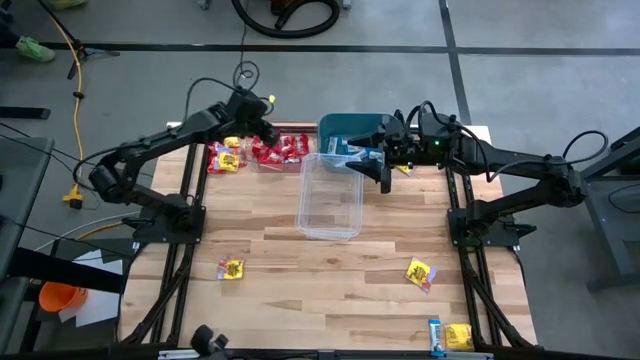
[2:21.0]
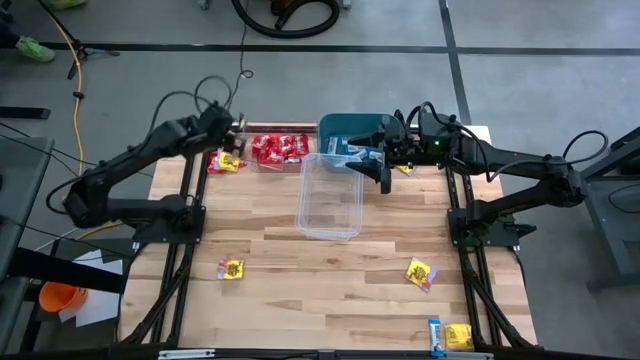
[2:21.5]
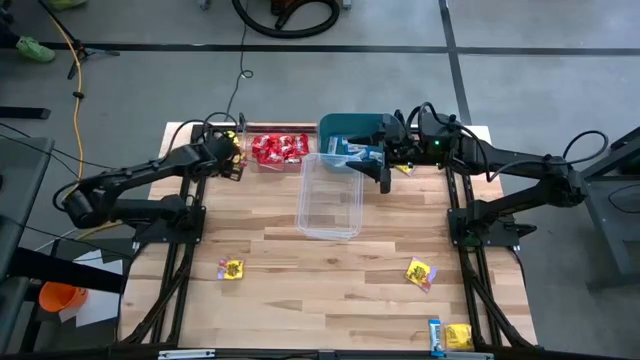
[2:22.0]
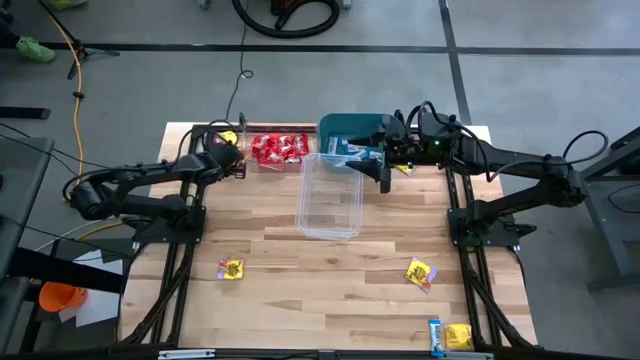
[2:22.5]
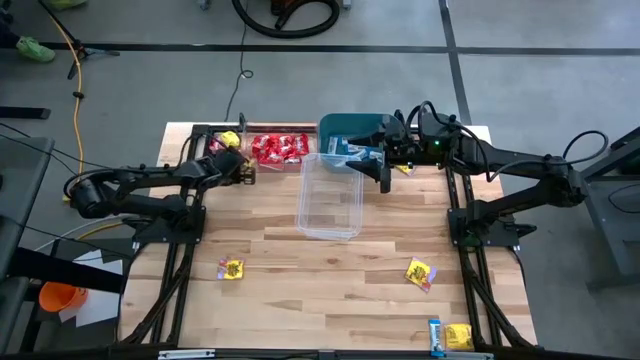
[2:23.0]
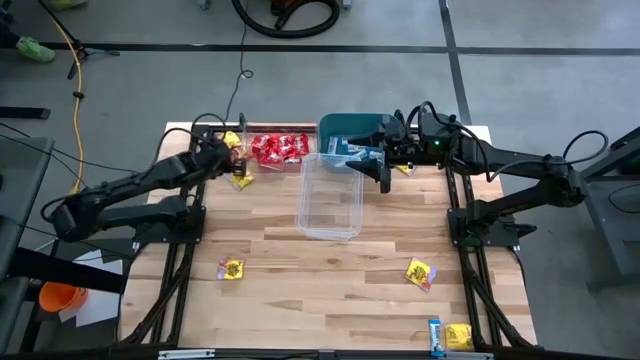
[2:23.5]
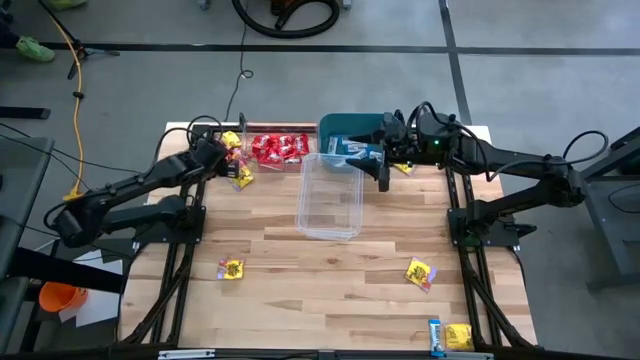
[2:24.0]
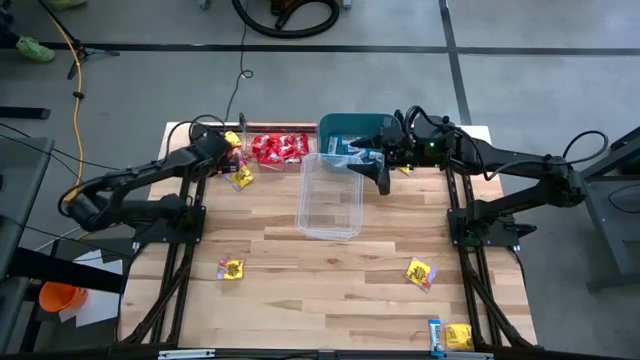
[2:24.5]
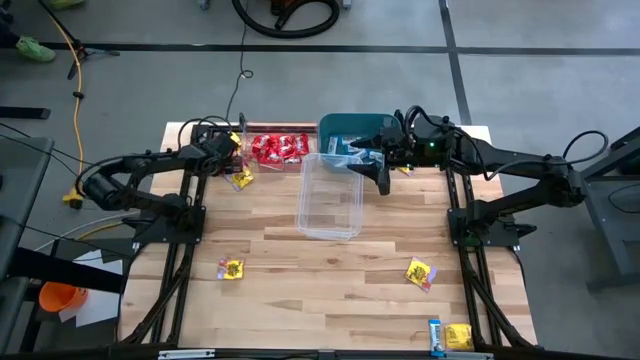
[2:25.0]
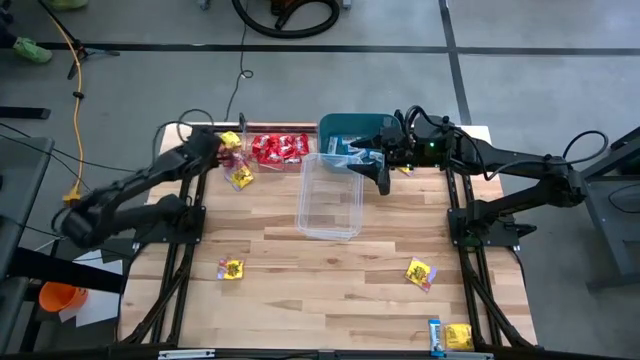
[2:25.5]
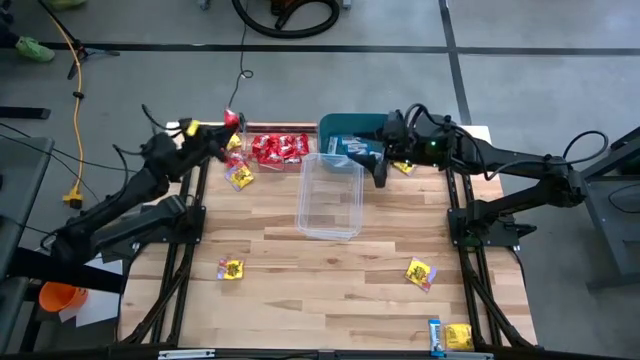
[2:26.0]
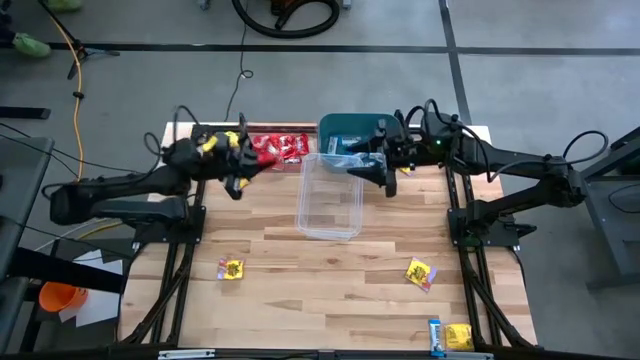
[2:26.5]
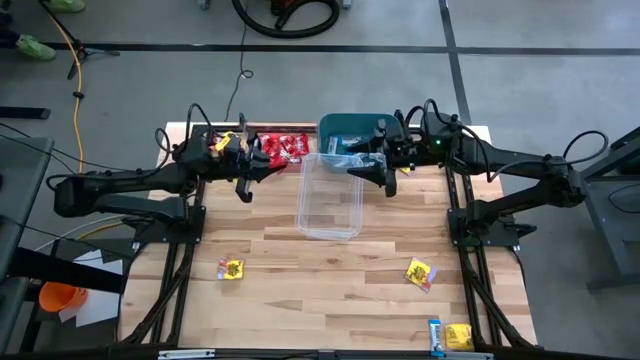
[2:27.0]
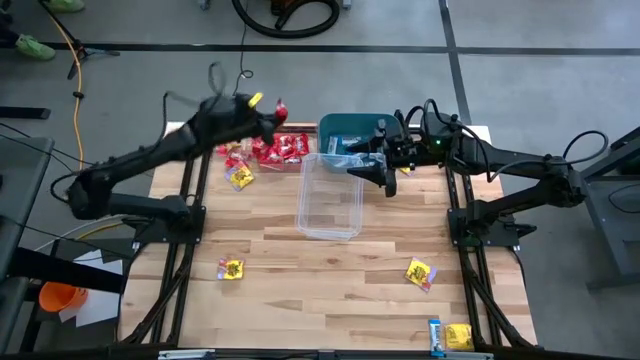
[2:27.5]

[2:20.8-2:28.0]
Task: Sort candy
Put the red candy into the transparent bin

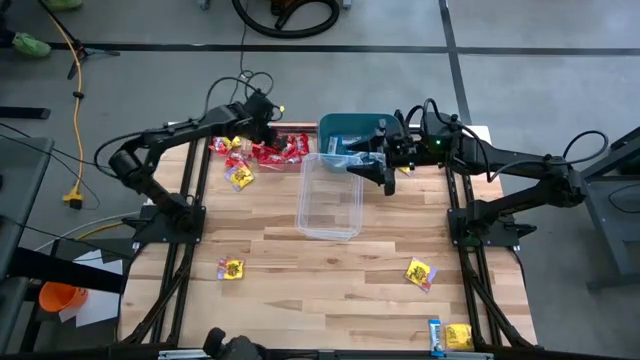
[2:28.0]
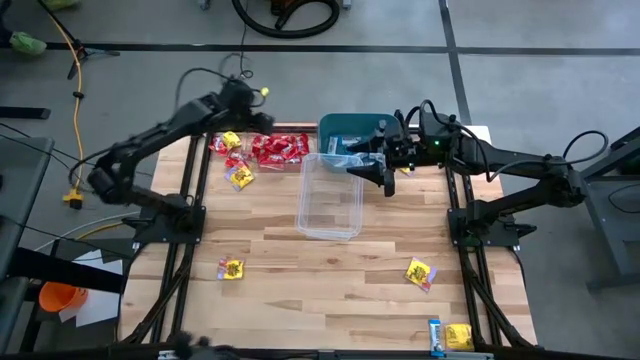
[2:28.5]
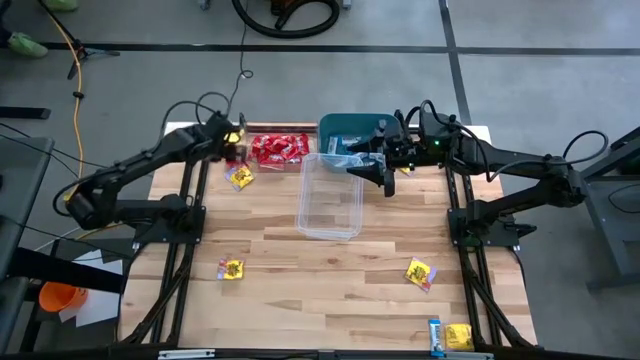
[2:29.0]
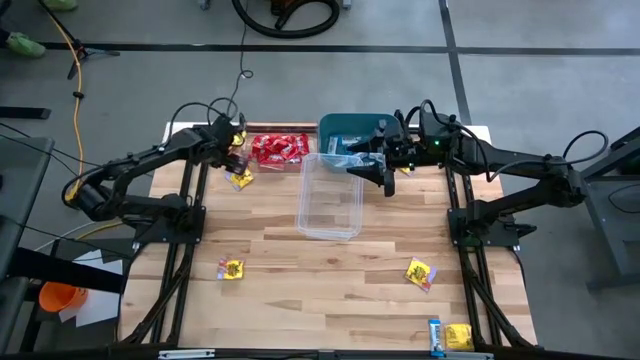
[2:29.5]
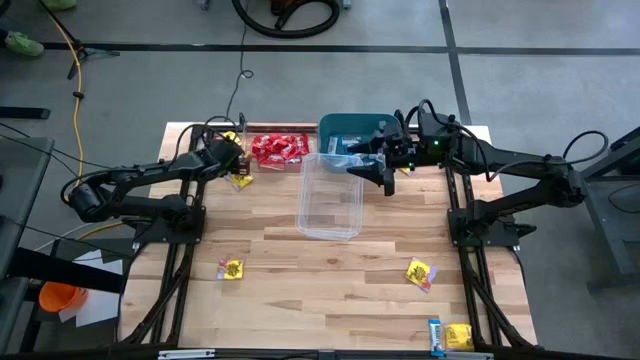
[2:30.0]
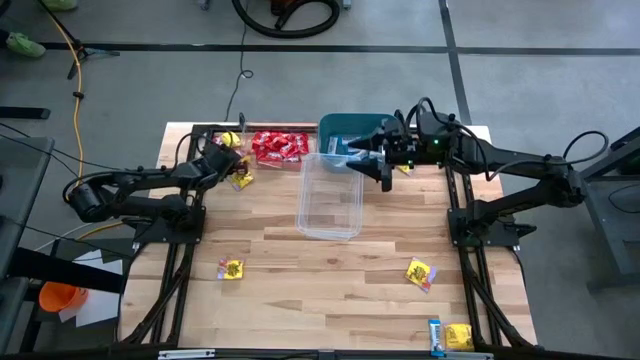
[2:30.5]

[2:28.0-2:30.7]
Put the red candy into the transparent bin

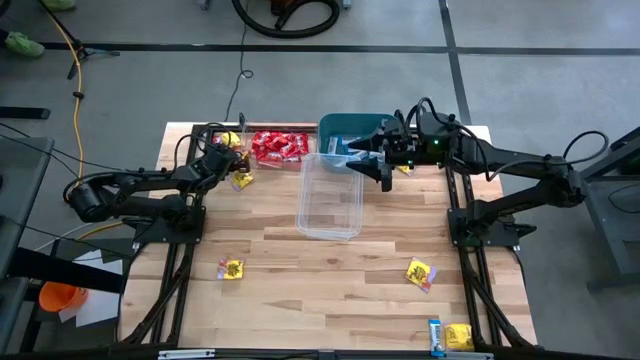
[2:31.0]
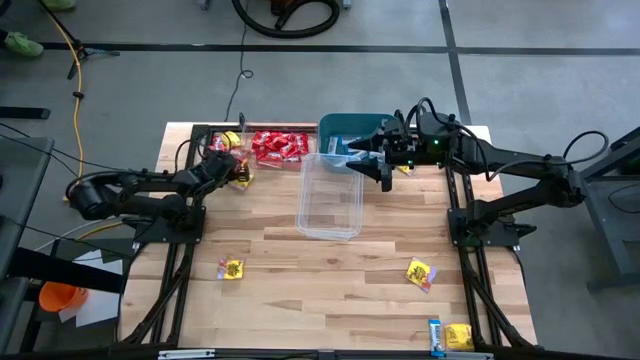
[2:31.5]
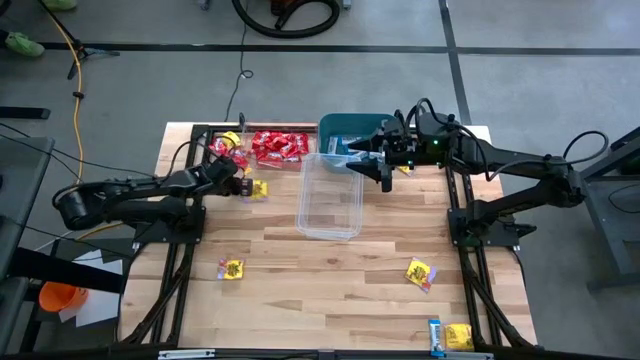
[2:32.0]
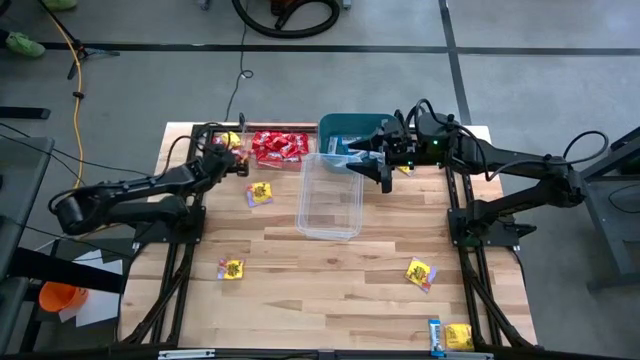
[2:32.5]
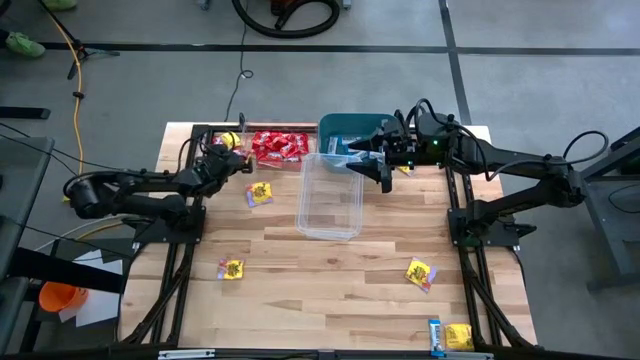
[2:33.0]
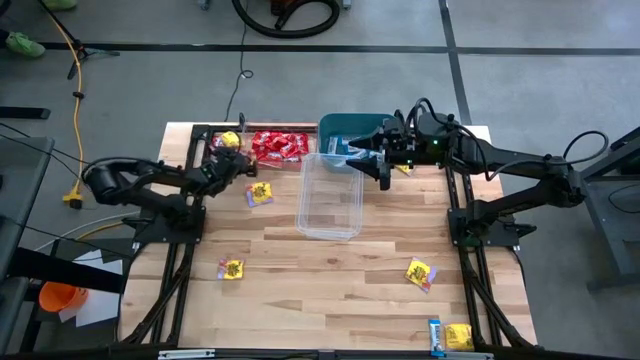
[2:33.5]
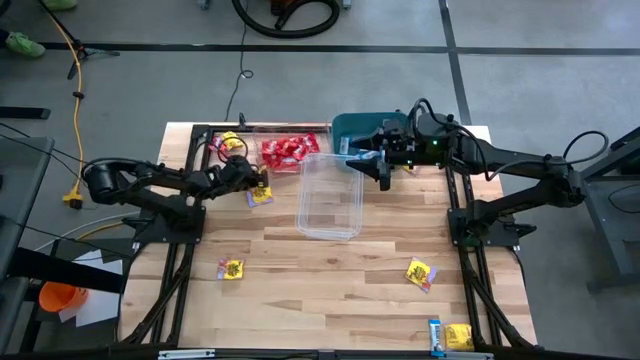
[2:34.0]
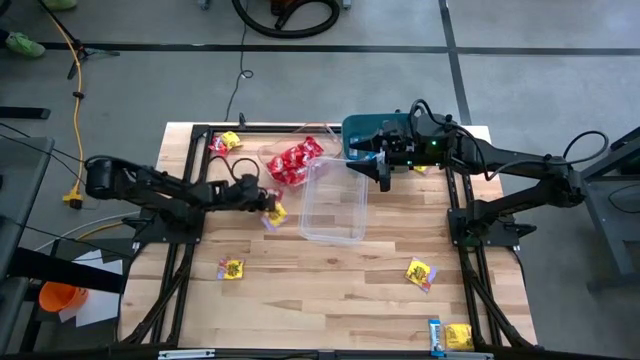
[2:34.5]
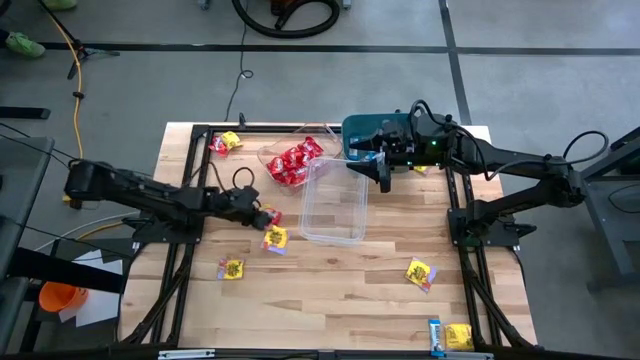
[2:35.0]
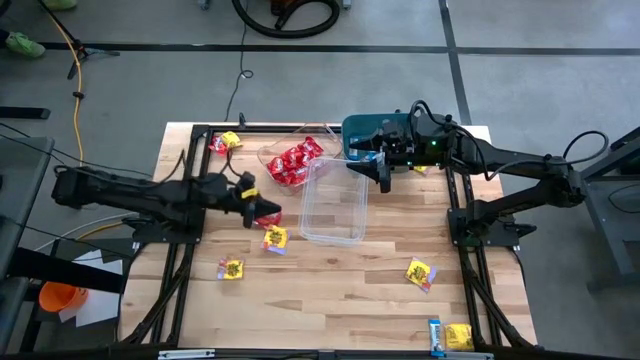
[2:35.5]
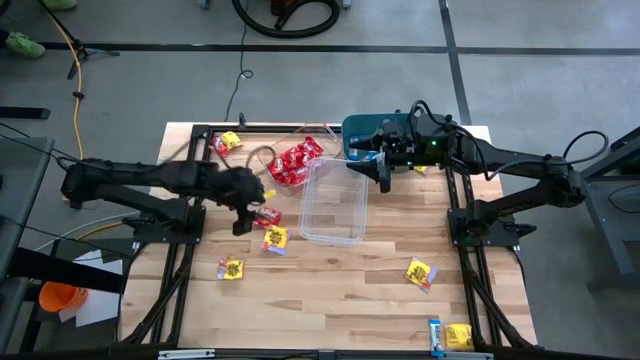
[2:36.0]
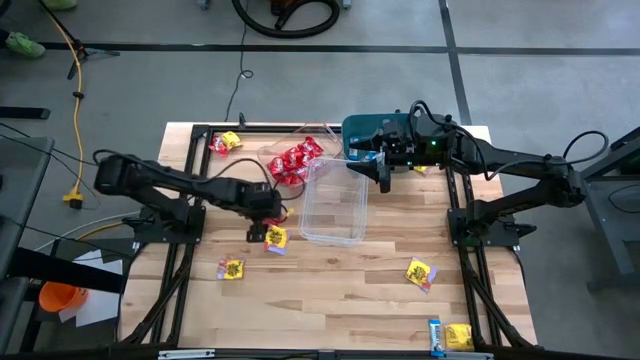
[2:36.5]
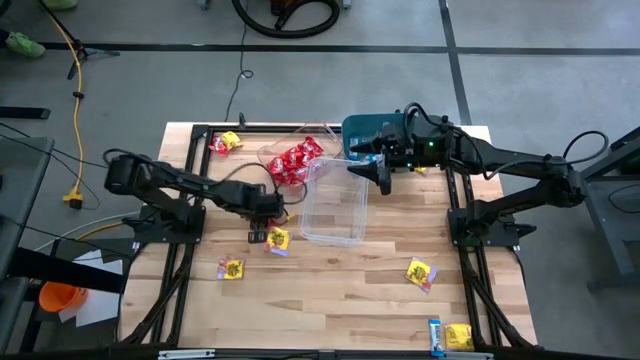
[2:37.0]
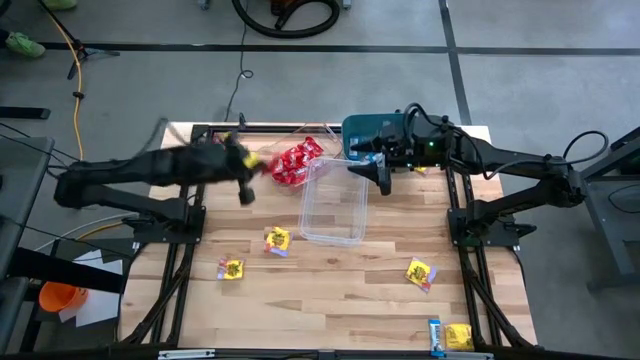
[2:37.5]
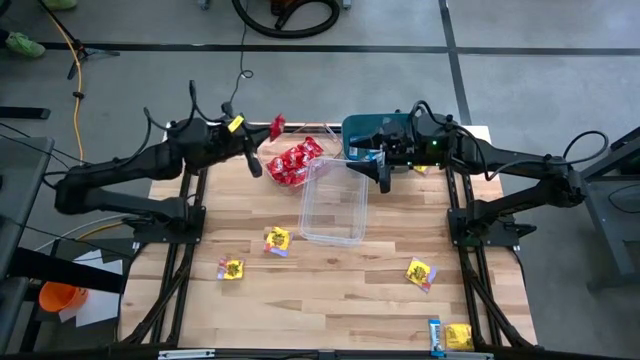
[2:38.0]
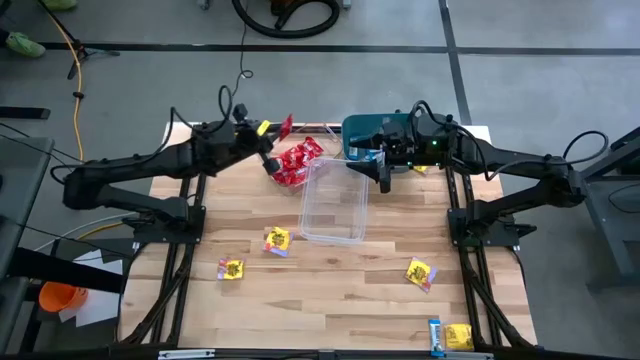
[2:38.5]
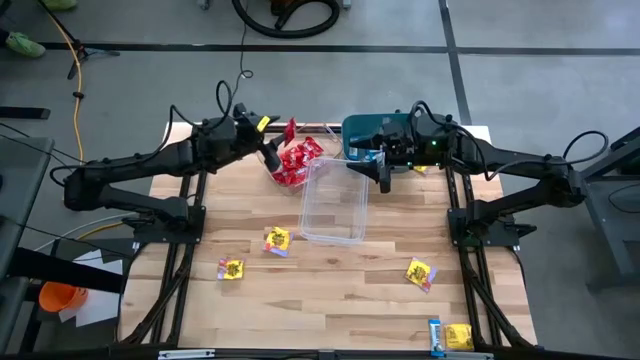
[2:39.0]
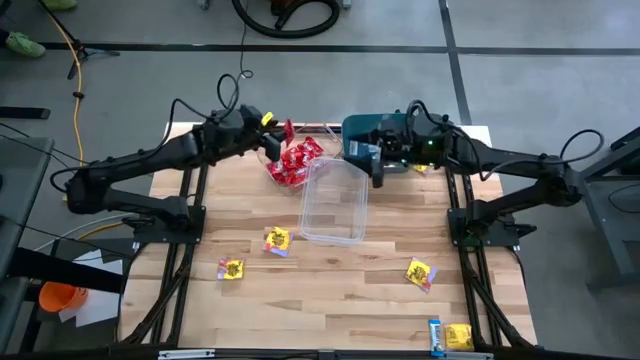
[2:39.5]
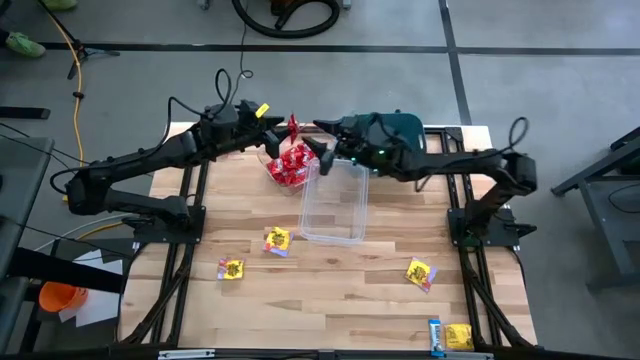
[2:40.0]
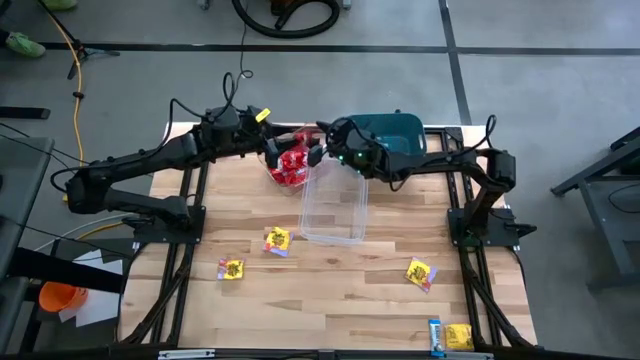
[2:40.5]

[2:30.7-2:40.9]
Put the red candy into the transparent bin

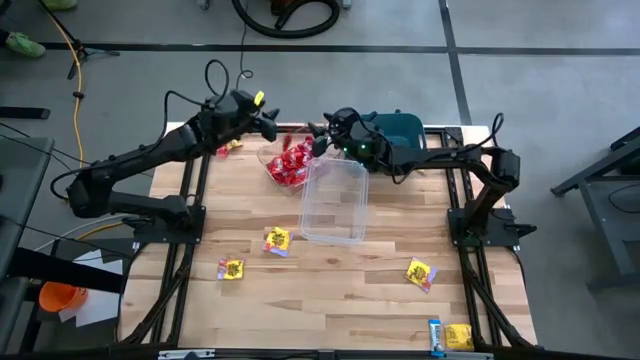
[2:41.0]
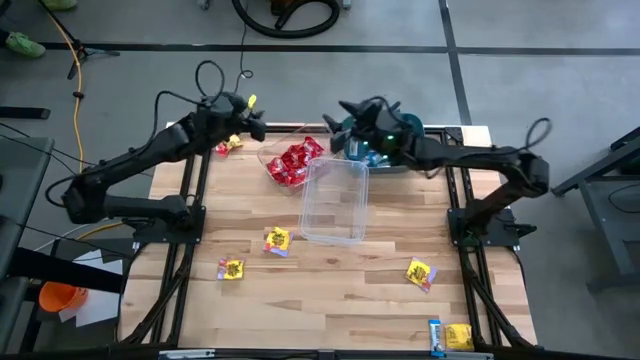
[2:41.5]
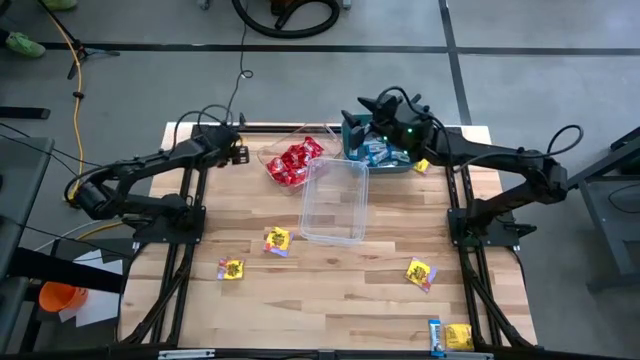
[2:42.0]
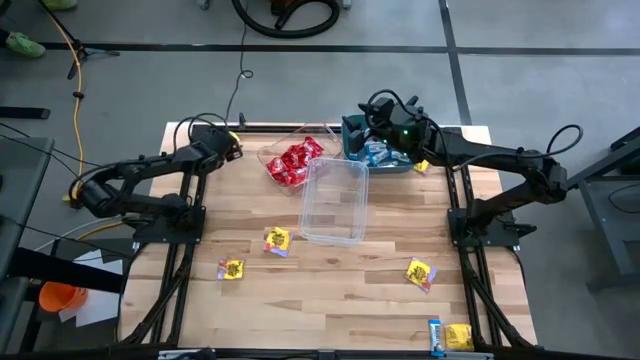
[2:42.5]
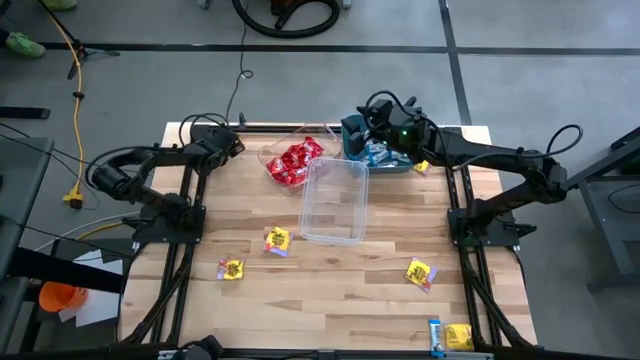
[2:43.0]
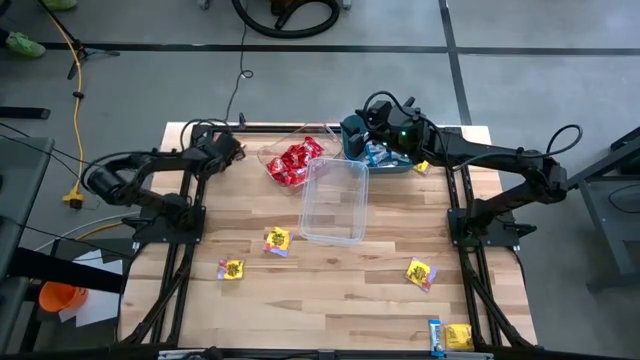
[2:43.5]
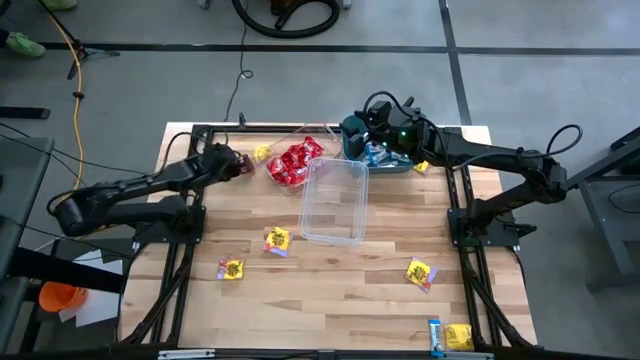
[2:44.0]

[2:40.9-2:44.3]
Put the red candy into the transparent bin
